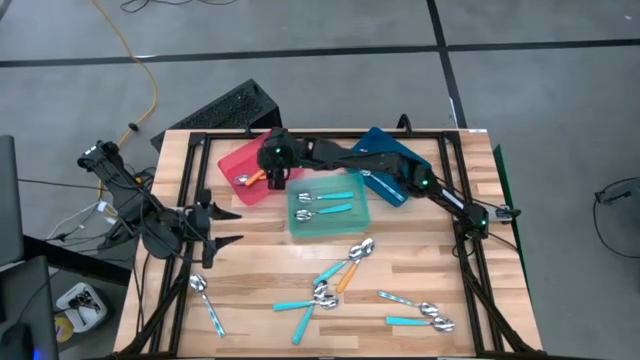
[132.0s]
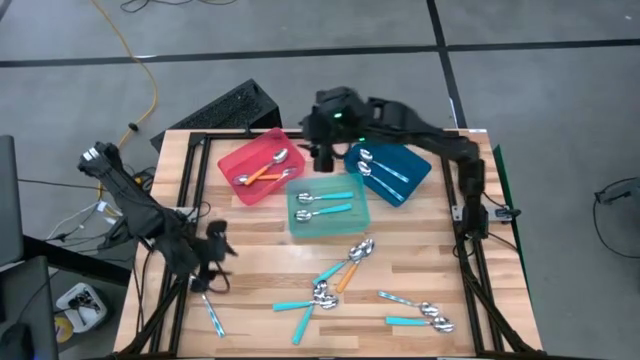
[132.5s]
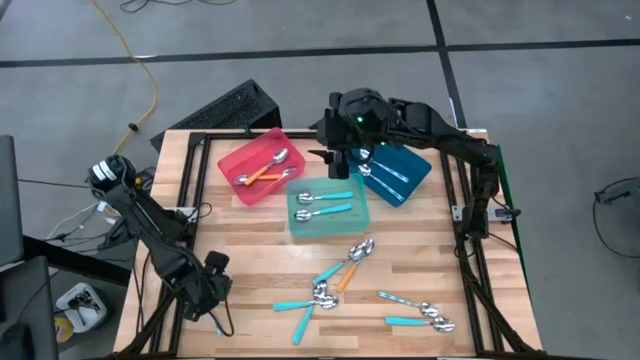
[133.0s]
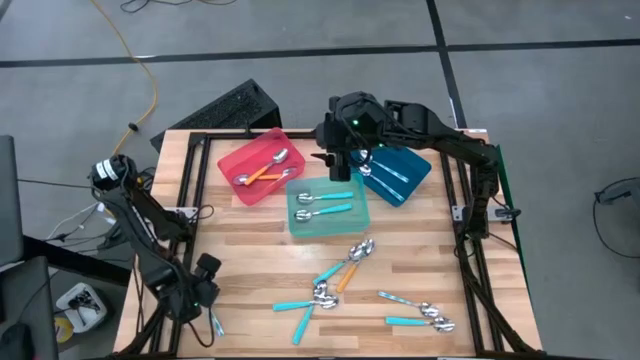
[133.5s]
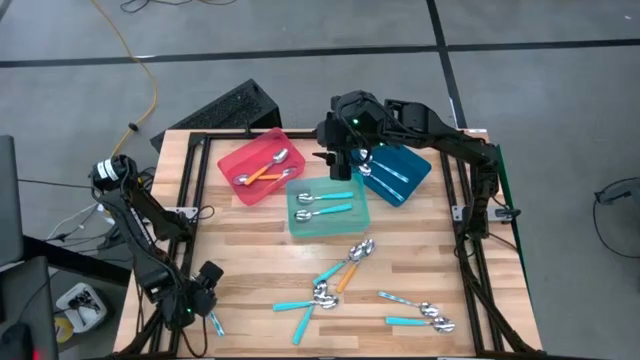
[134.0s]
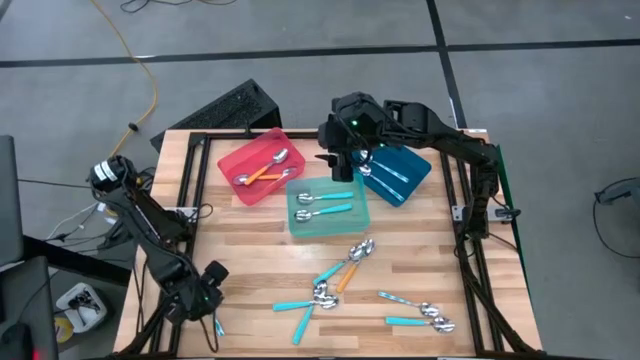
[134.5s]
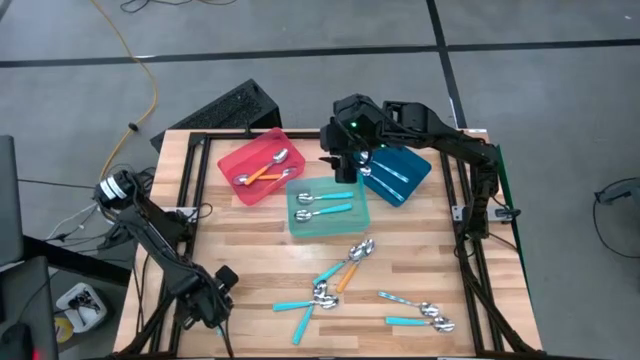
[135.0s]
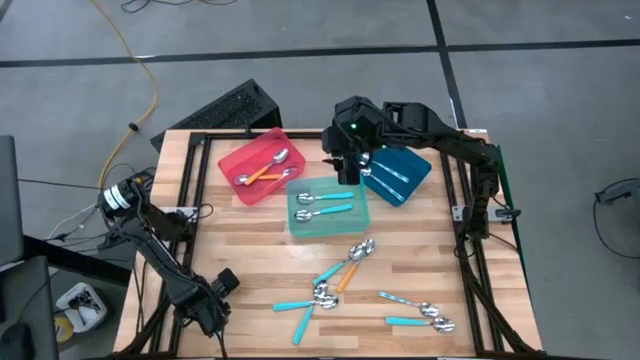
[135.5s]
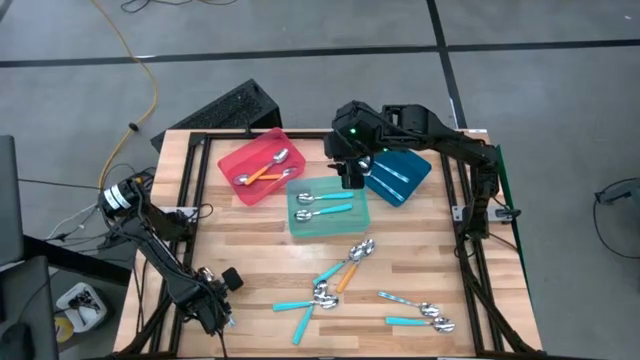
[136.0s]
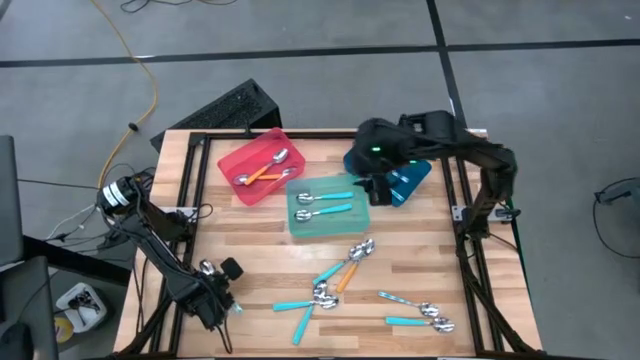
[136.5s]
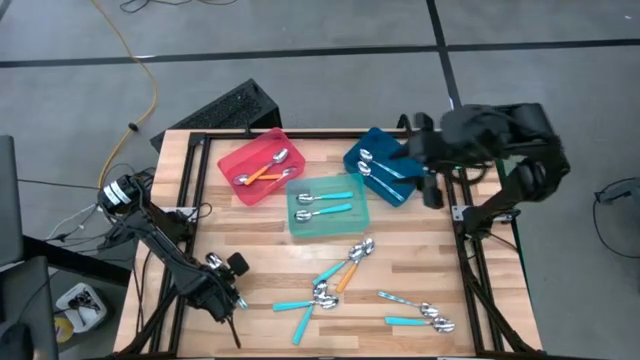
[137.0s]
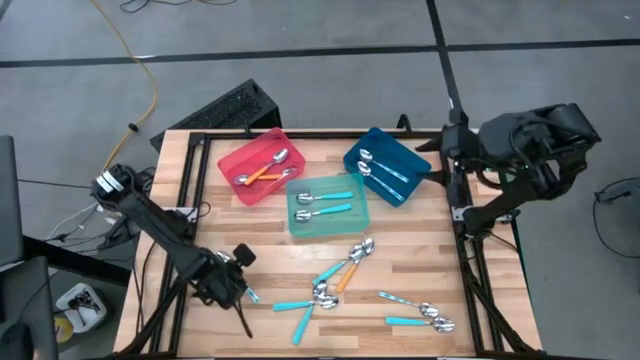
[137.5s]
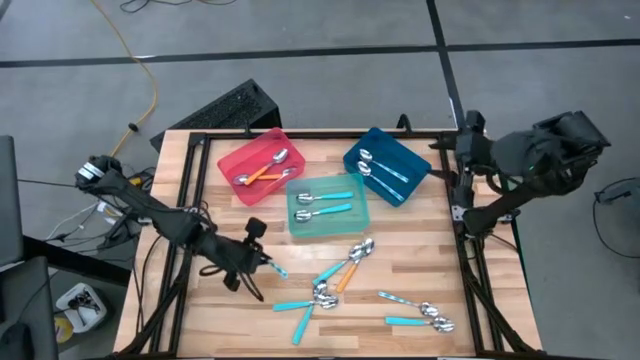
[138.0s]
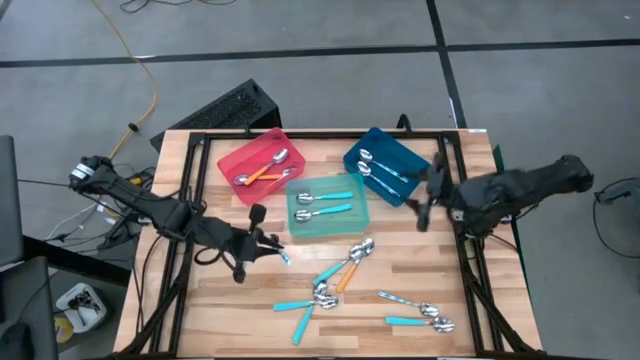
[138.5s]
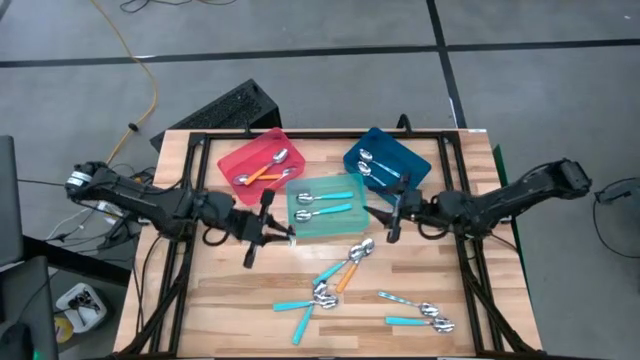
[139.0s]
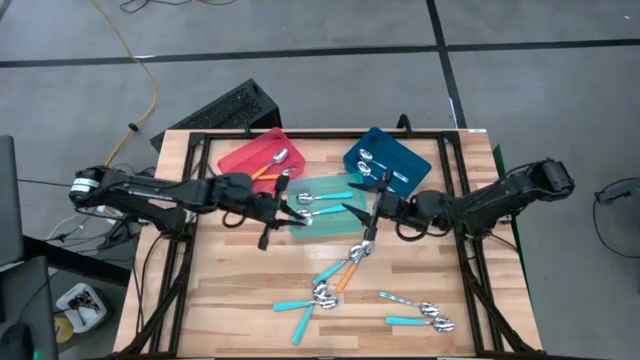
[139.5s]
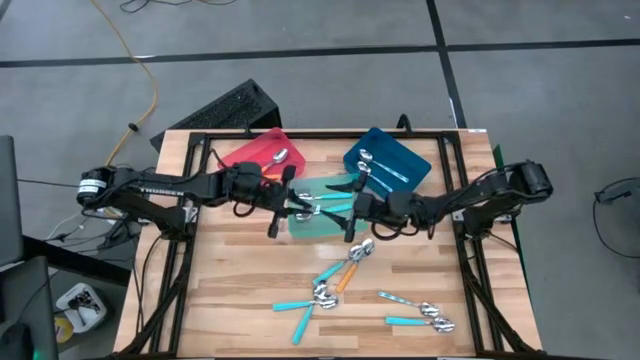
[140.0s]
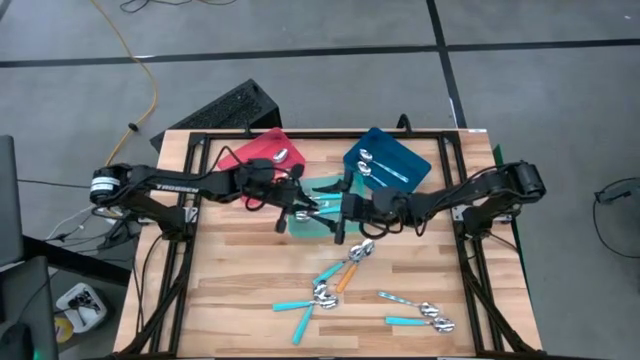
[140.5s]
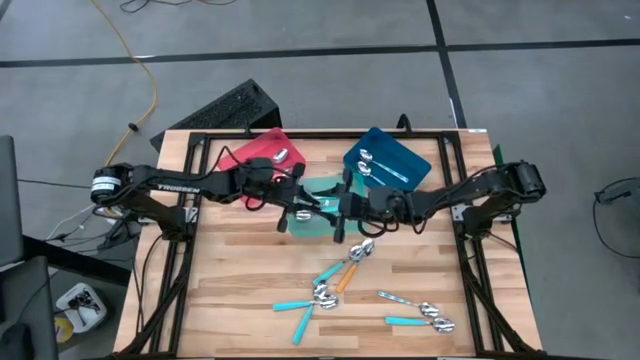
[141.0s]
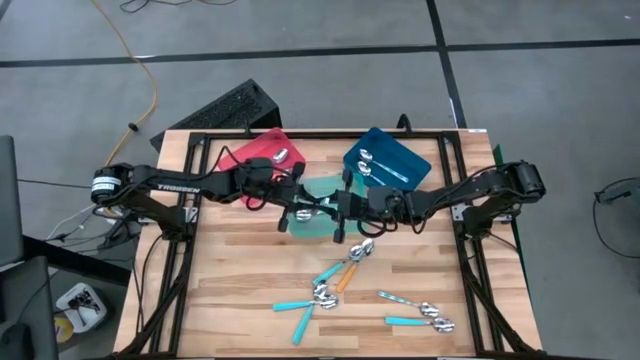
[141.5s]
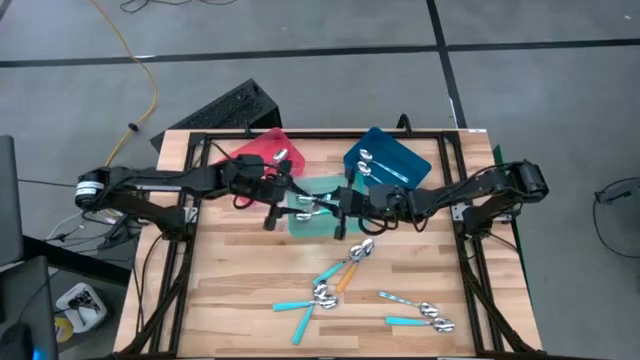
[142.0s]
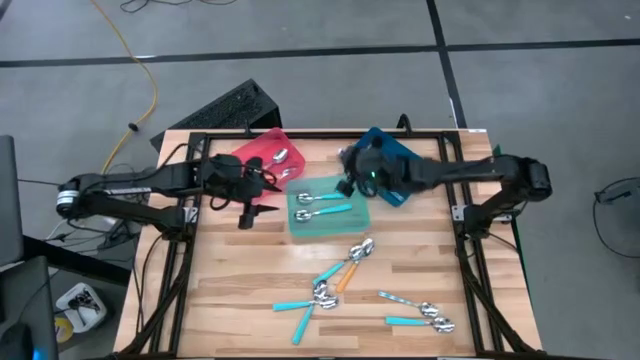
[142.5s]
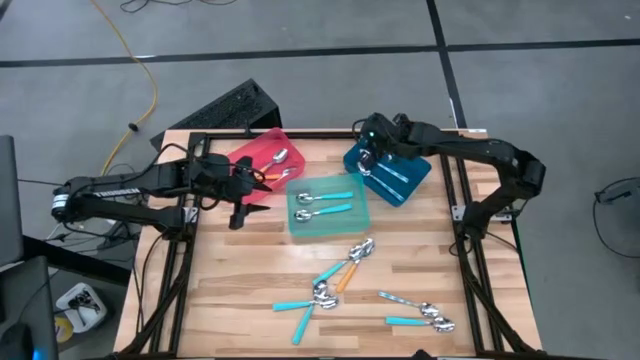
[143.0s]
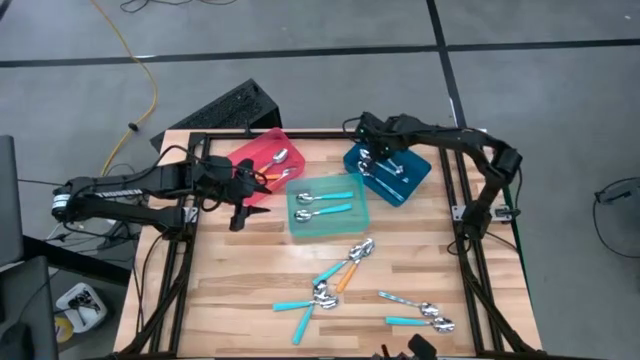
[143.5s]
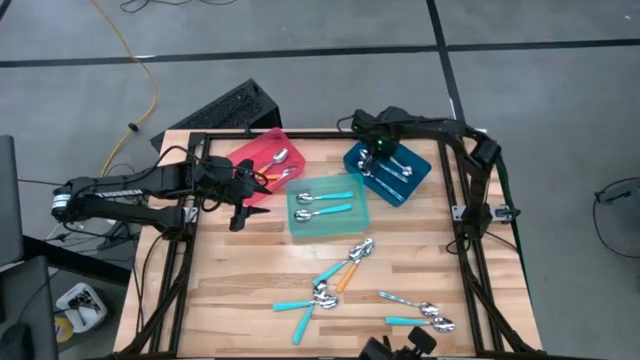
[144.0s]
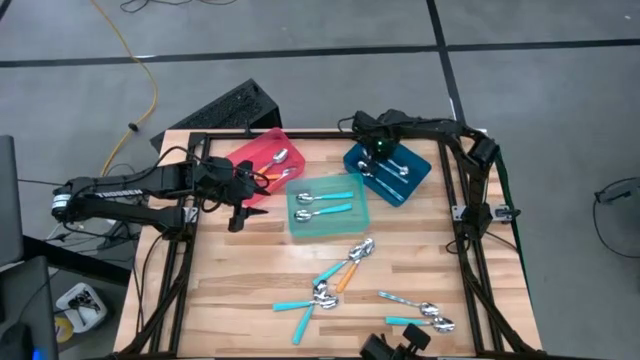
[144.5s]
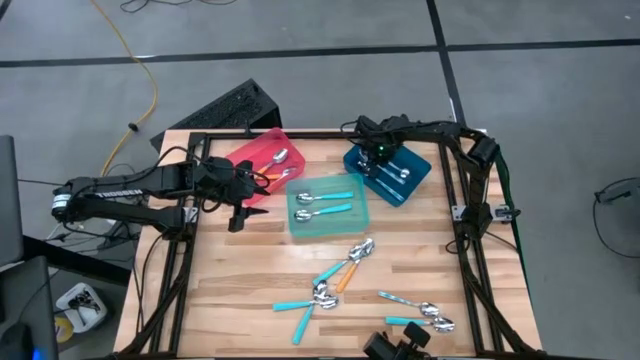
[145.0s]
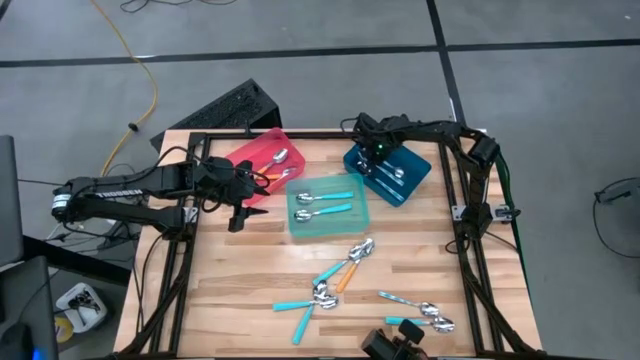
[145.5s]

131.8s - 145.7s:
Task: Sort silverware by color (type)
Put the left patterned blue spoon into the blue bin

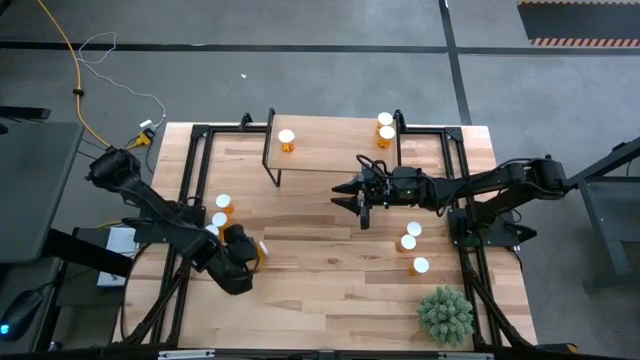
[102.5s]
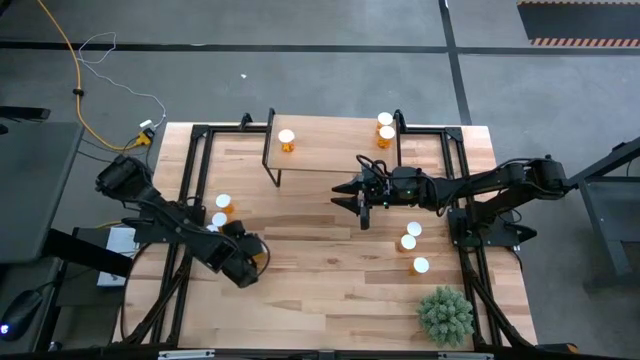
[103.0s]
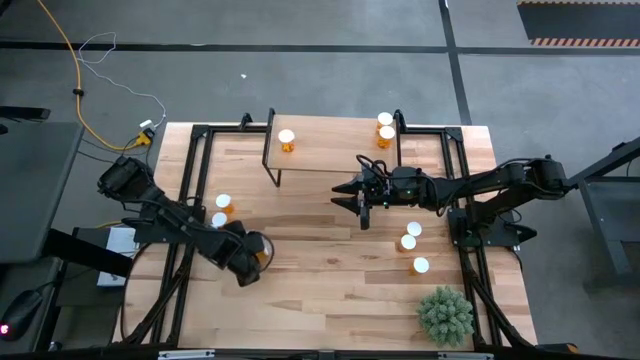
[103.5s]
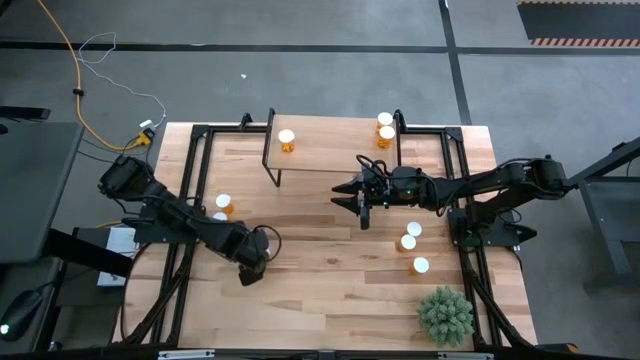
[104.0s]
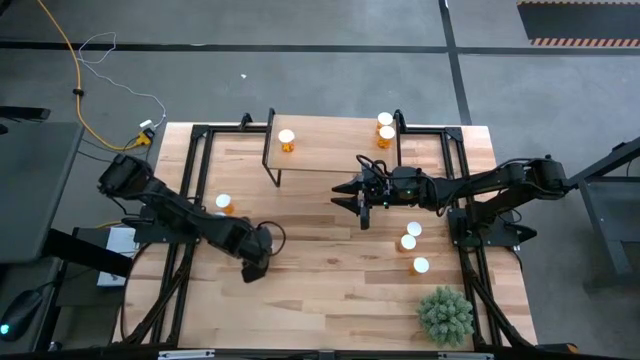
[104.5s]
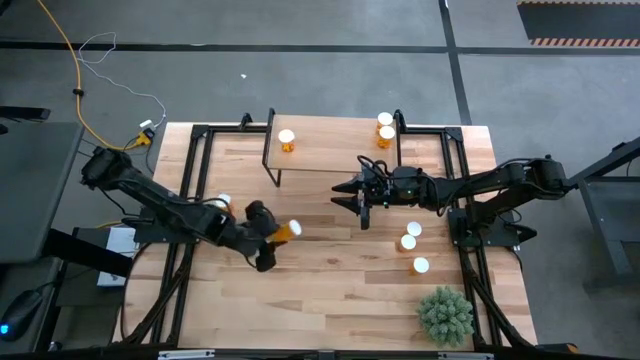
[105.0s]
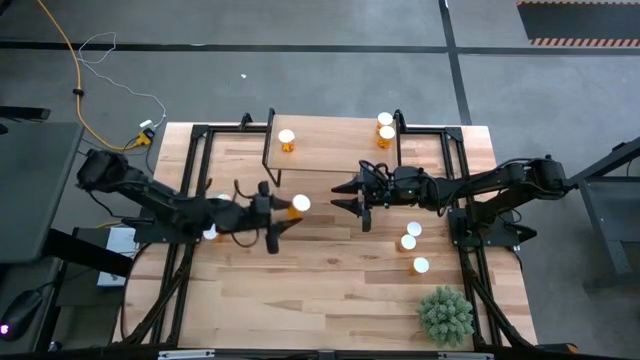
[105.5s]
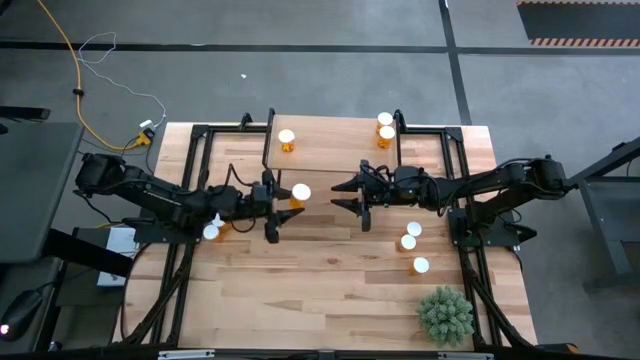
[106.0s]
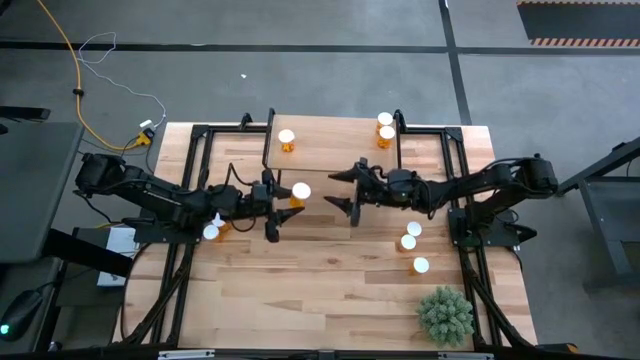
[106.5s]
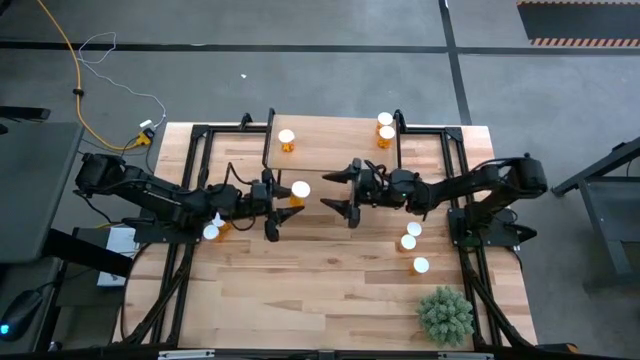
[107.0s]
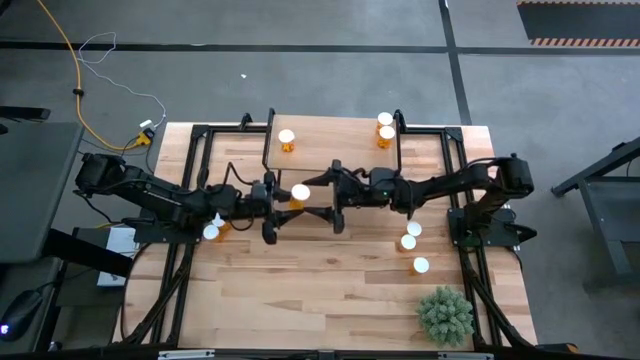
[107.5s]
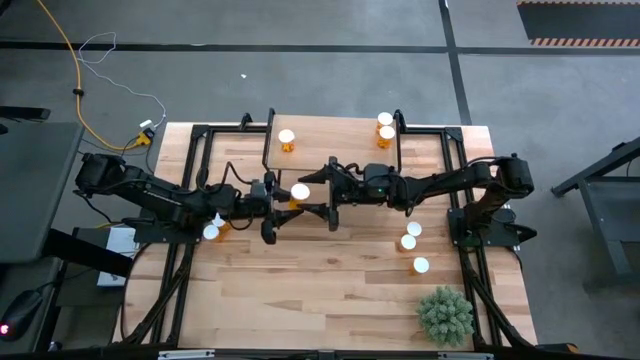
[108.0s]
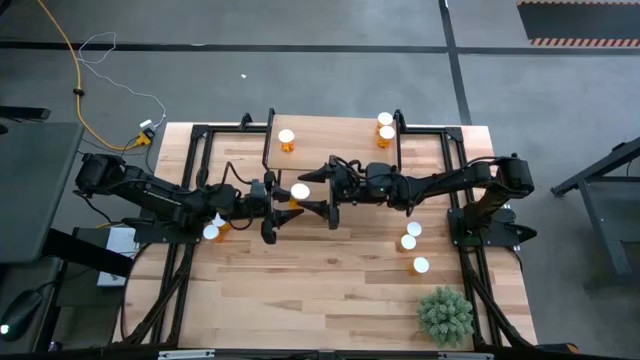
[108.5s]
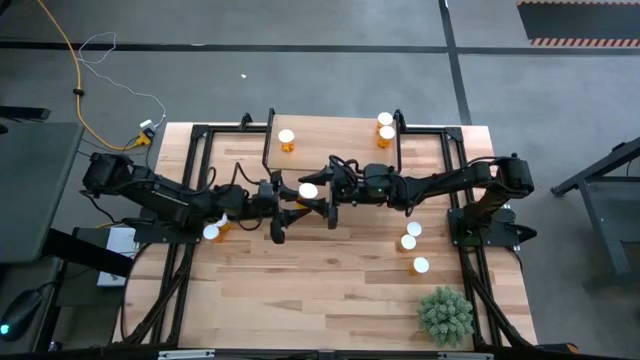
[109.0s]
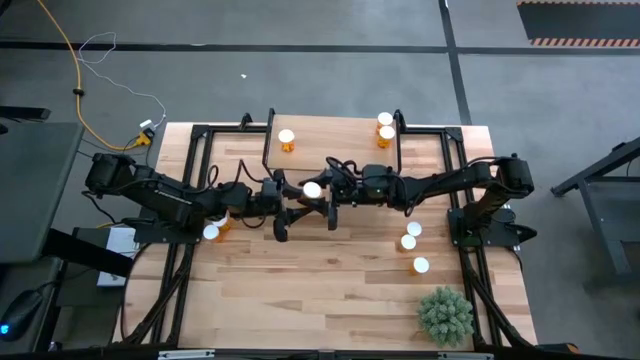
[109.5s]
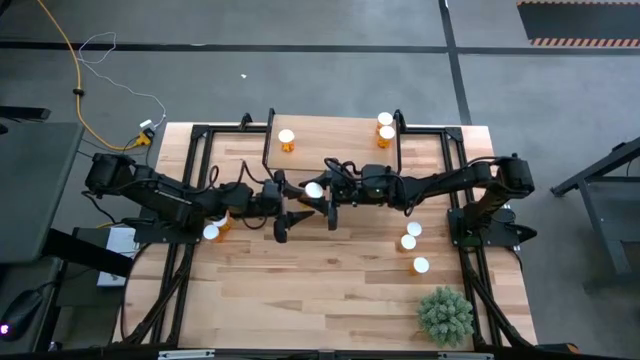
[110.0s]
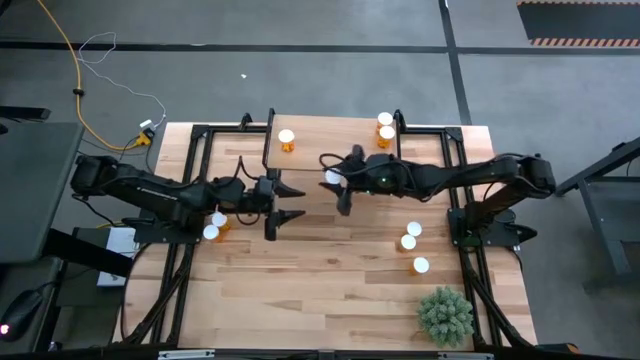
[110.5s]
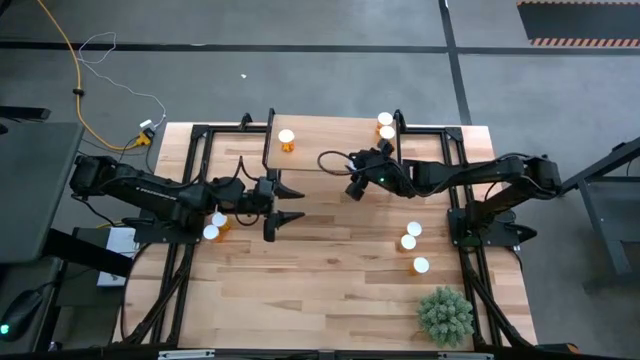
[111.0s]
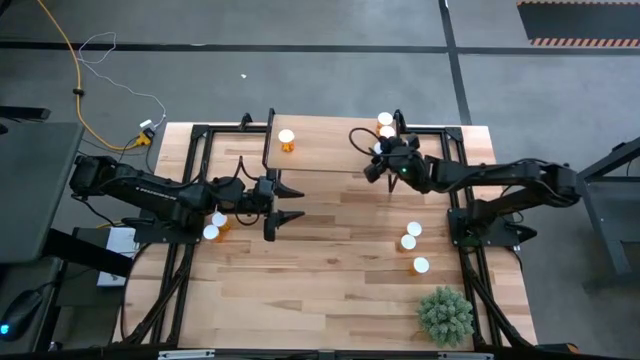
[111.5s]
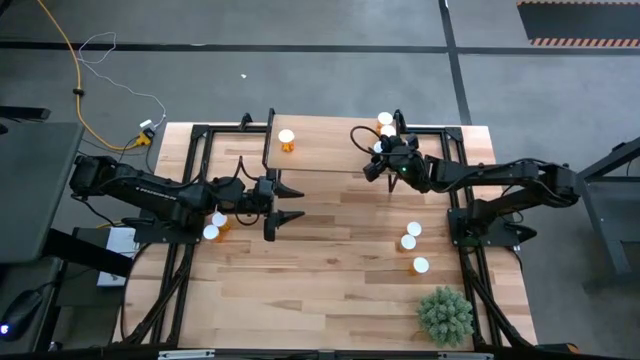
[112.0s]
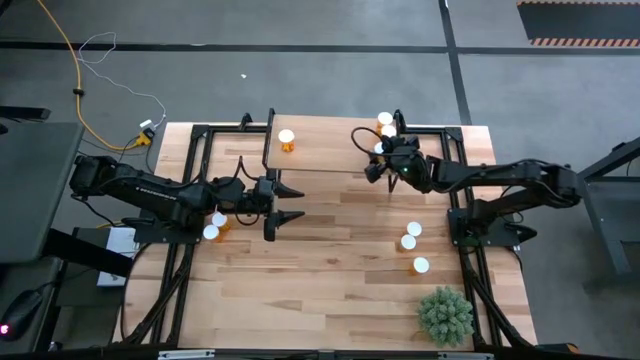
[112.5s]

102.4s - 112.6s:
Task: Pick and place medicine bottles onto shelf by color
Put the yellow pill bottle on the shelf
